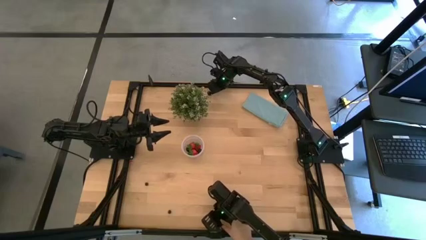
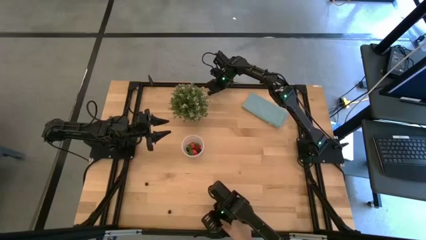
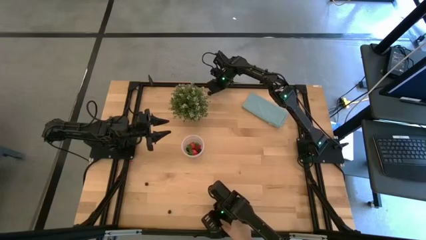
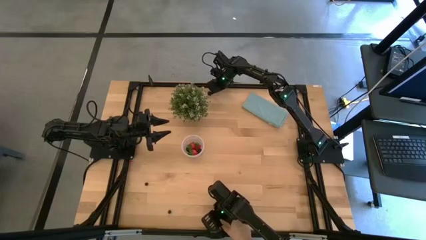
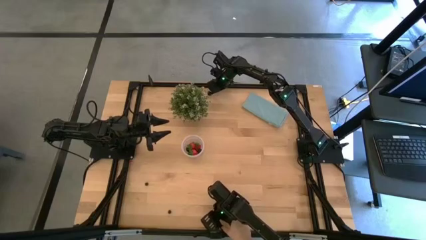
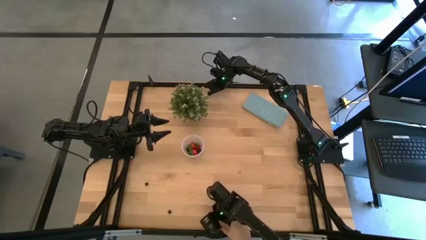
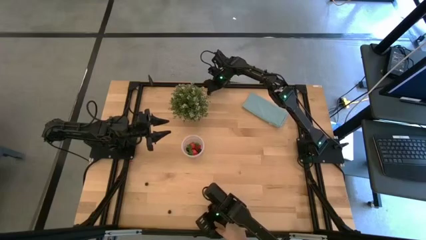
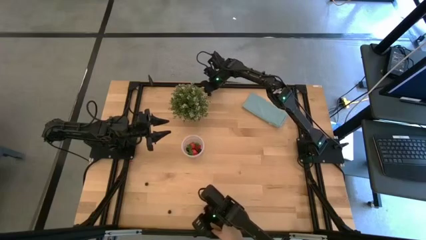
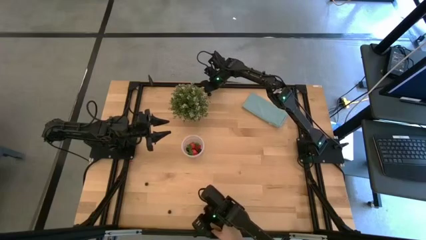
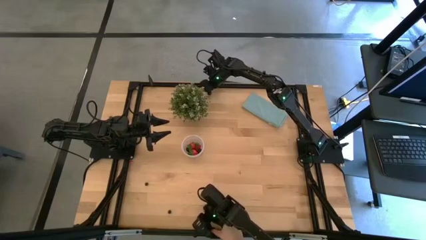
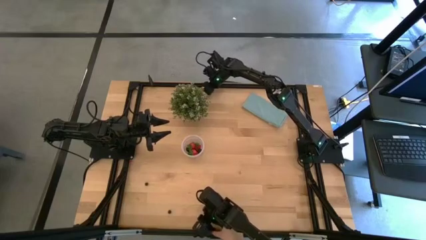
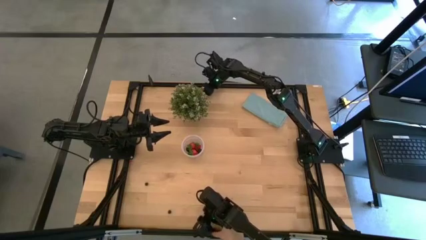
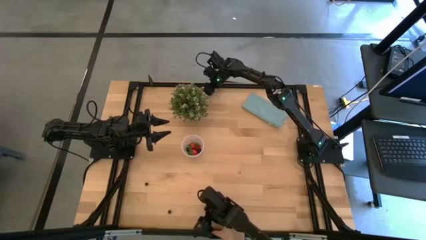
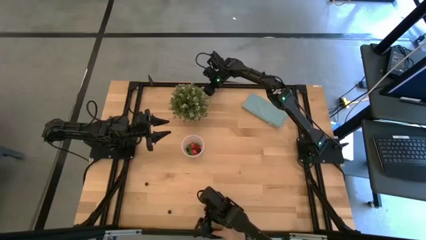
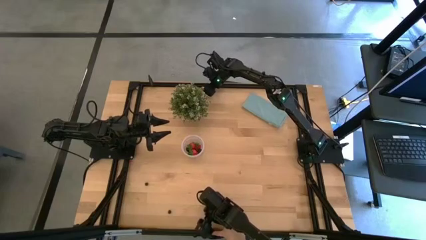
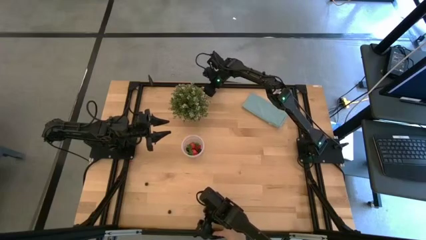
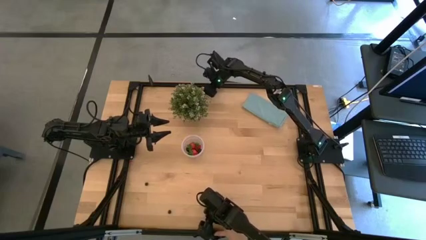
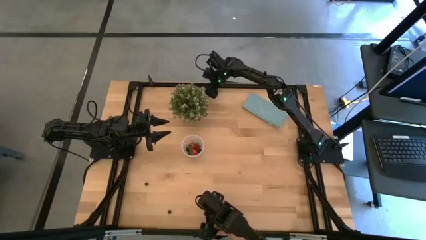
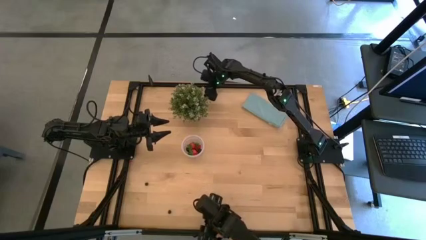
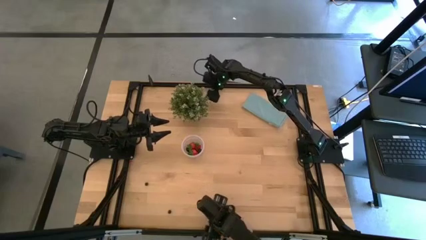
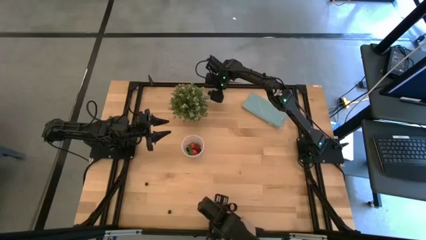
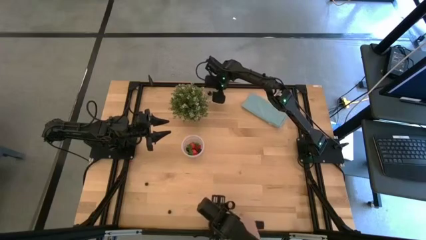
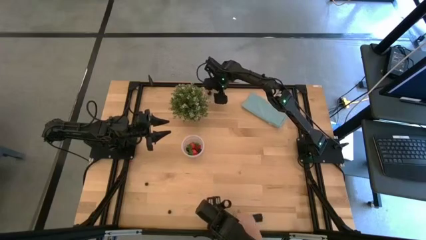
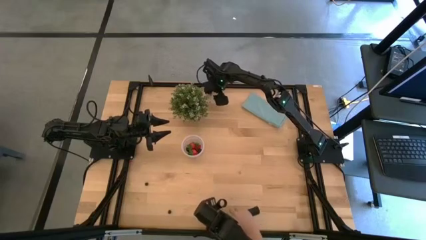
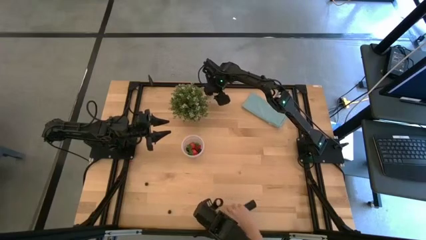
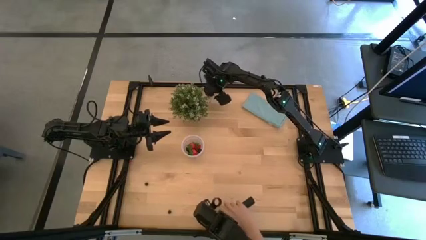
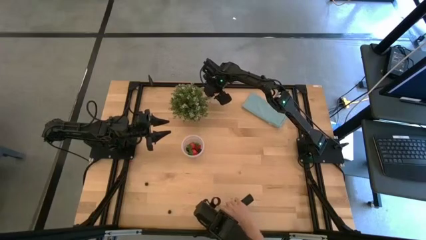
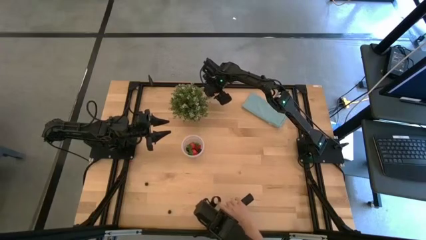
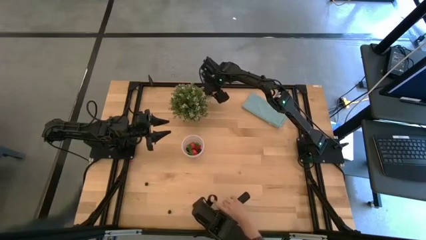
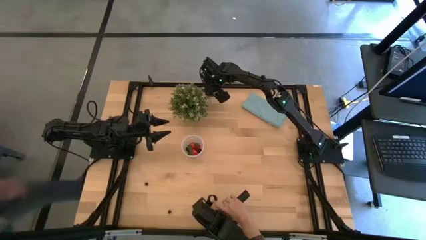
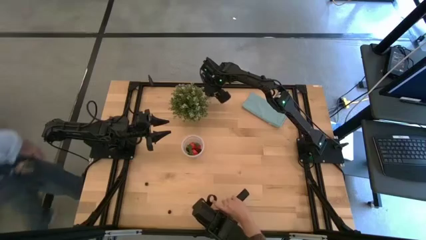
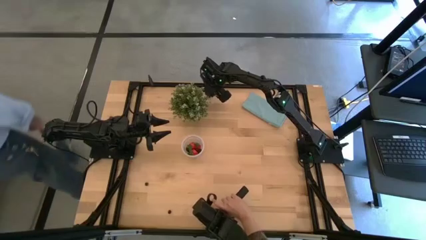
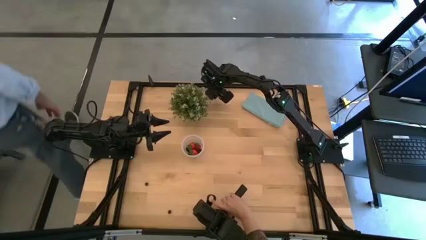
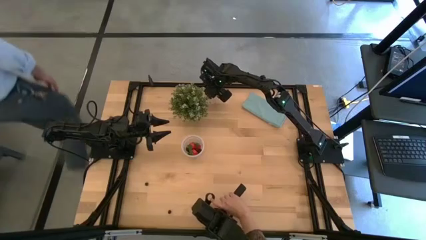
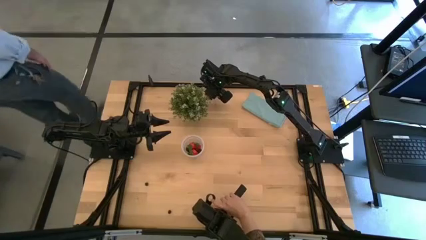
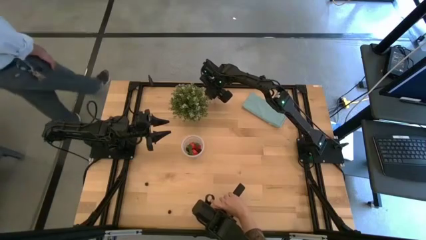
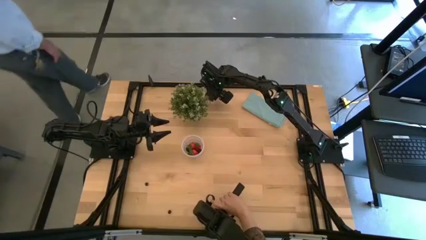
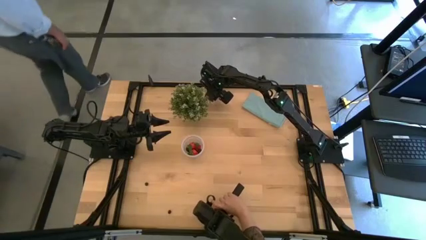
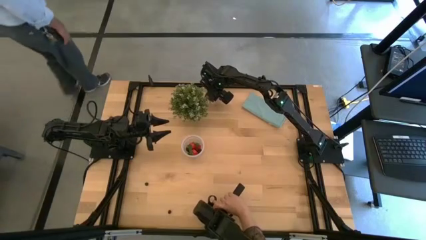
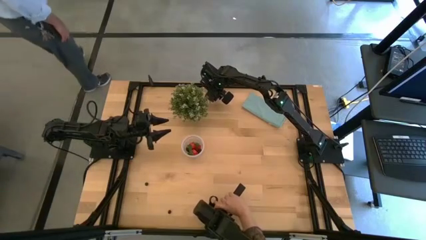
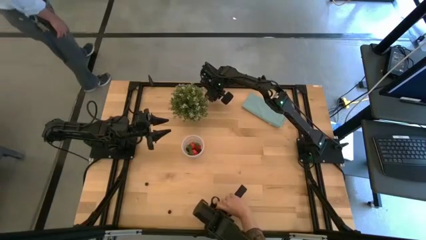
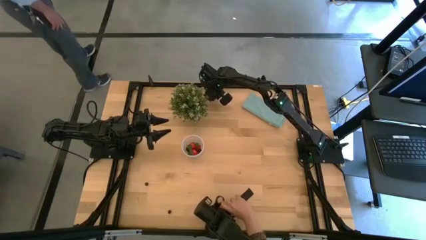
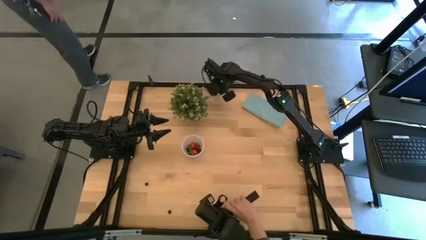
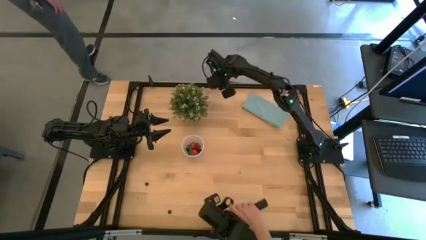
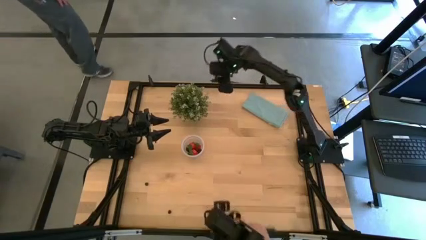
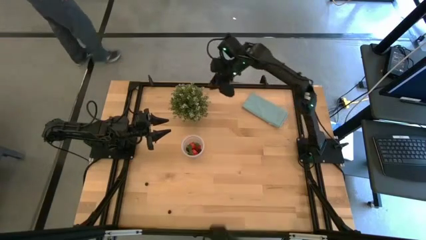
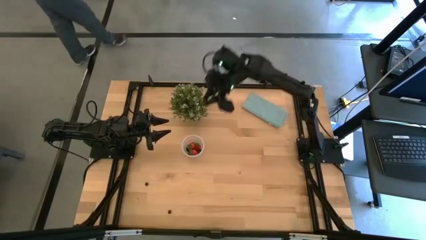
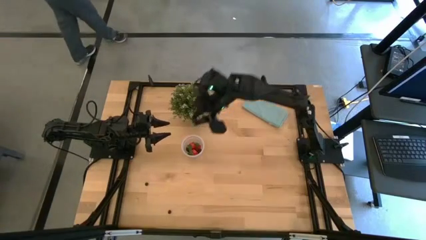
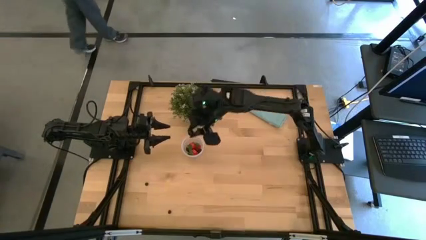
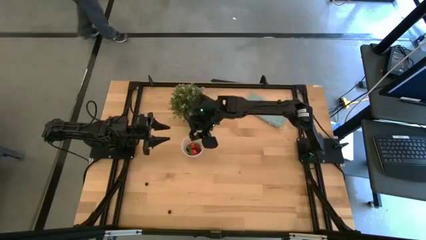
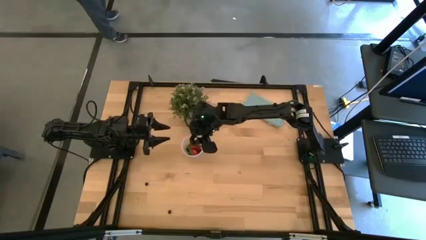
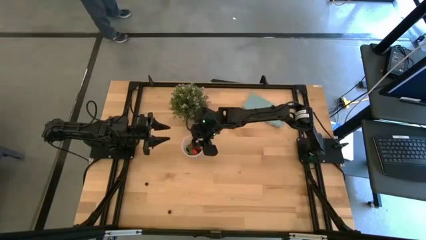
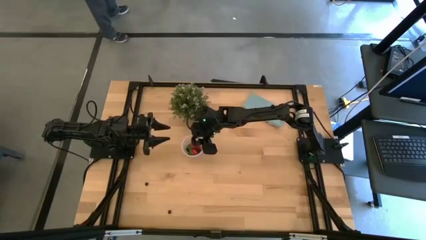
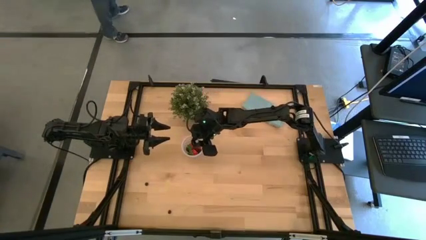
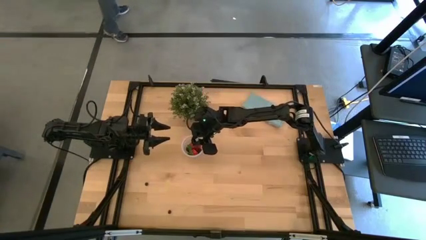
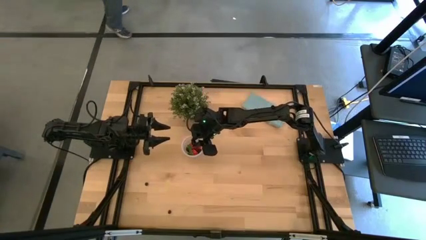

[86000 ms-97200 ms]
Task: Pick and placing Produce into tupperware
Put the black cherry into the transparent container

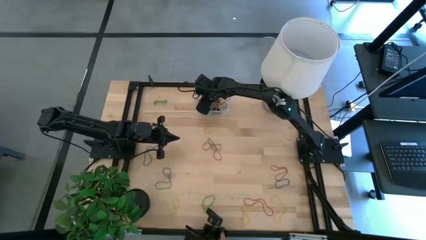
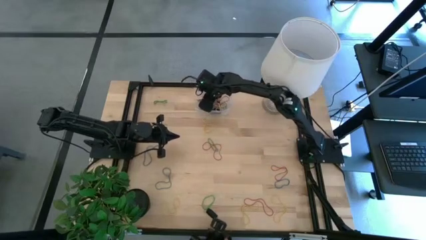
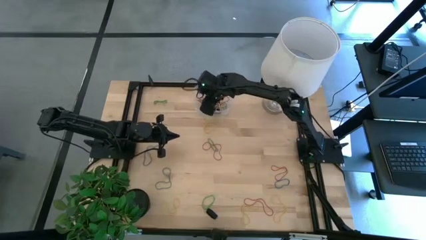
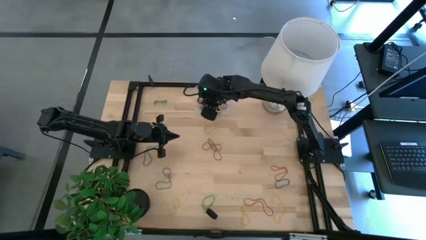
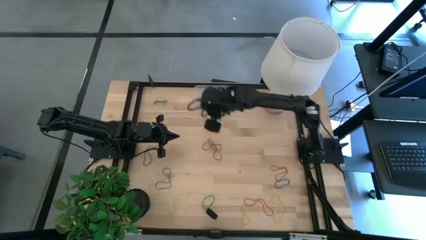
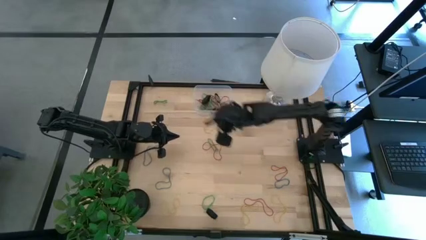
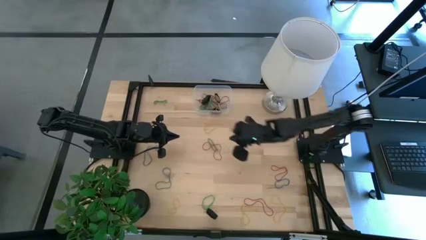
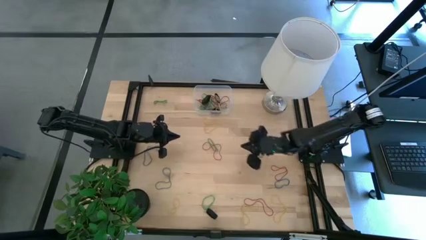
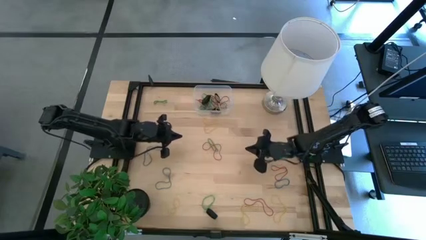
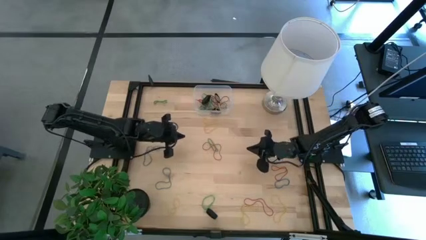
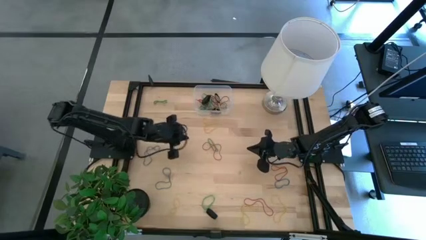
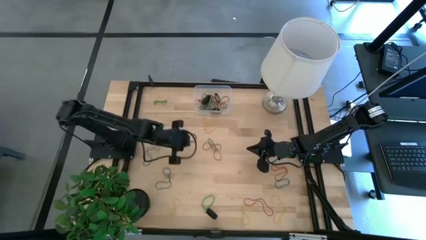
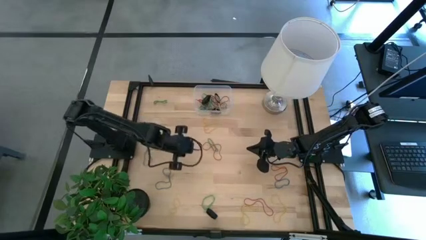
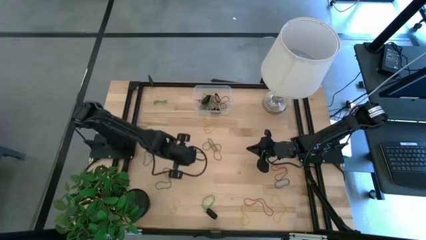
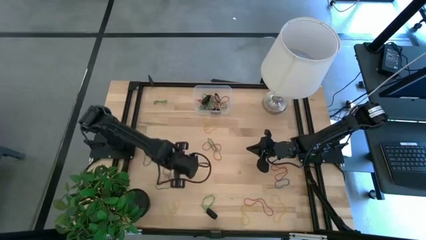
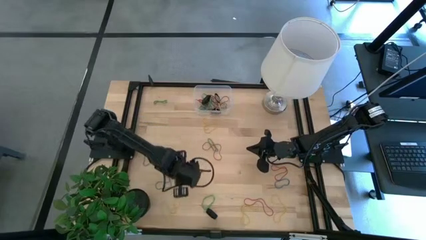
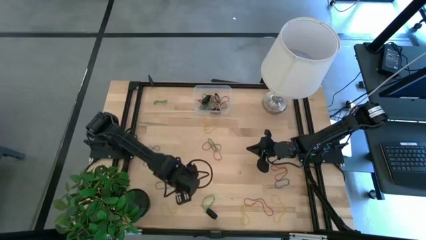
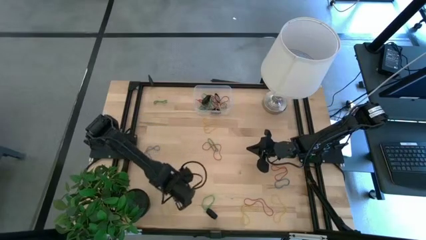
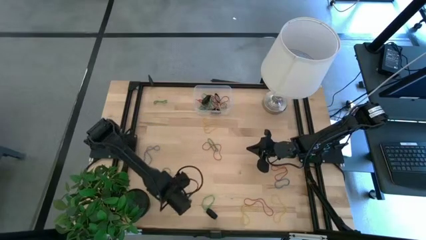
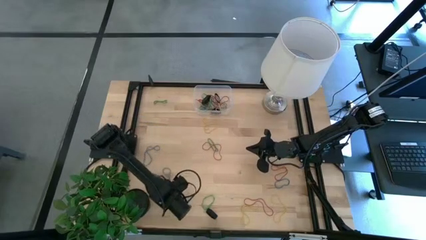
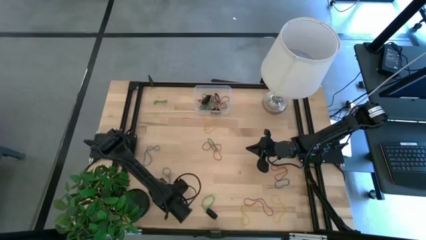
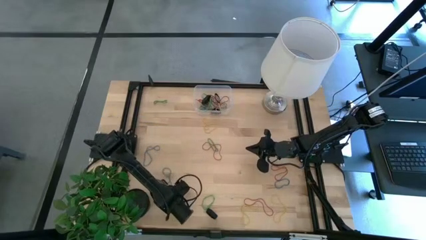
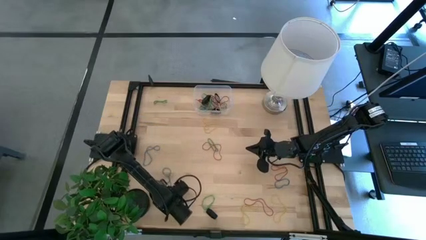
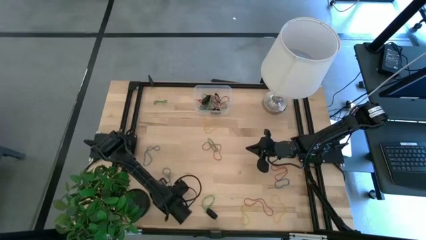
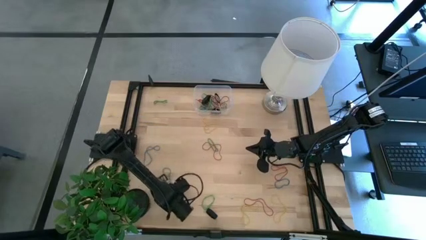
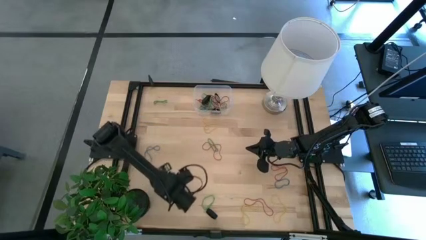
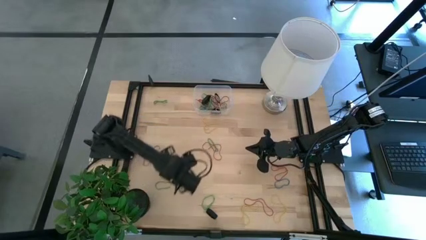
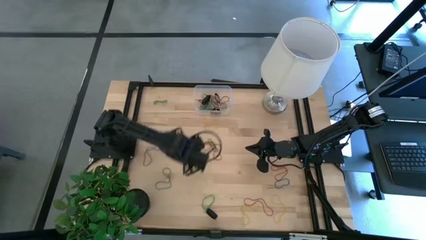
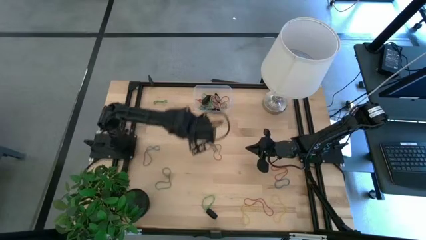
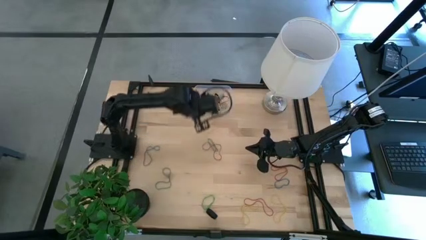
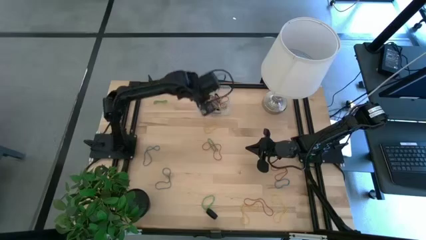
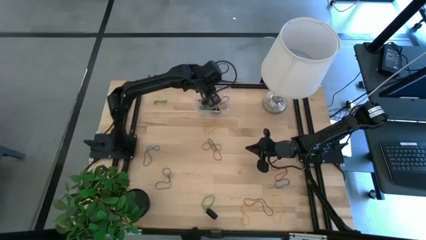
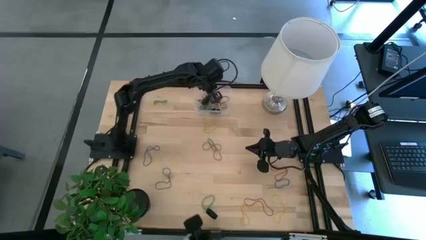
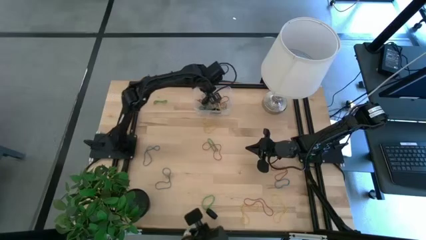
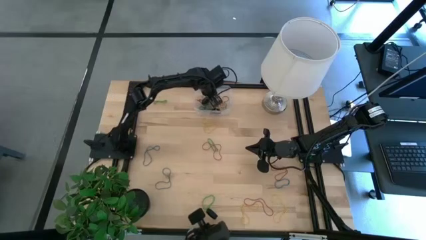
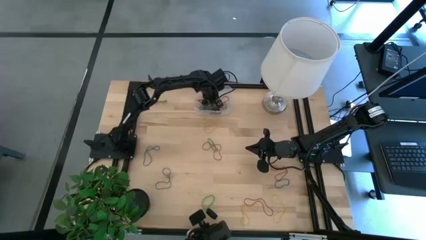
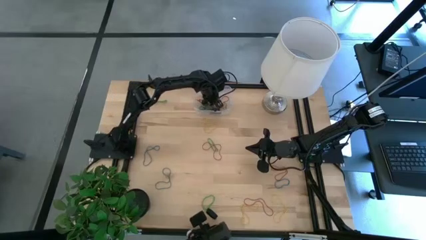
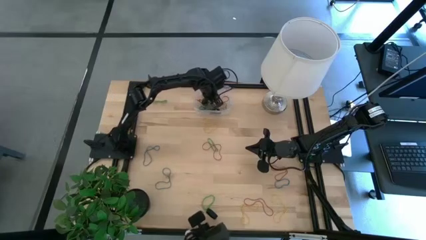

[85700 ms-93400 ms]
Task: Pick and place rubber bands into bin
Put the yellow rubber band into the transparent bin
